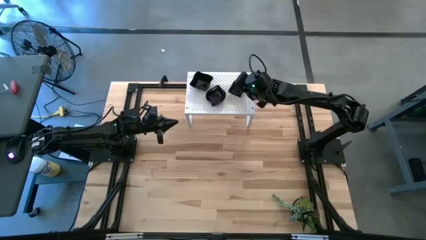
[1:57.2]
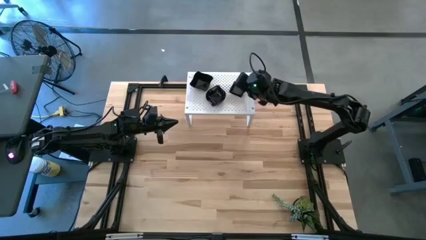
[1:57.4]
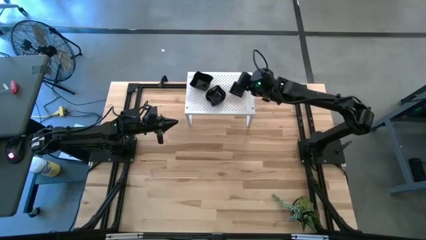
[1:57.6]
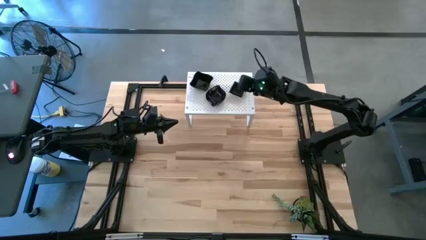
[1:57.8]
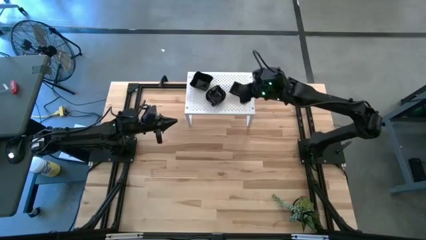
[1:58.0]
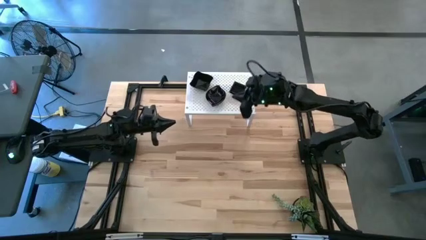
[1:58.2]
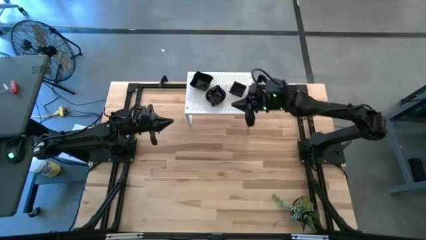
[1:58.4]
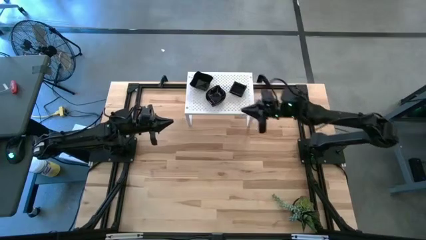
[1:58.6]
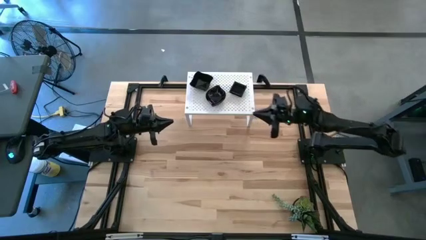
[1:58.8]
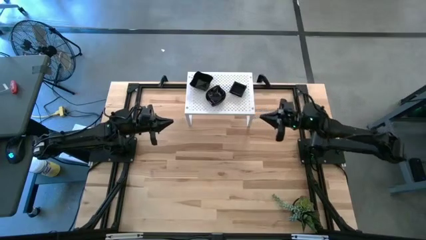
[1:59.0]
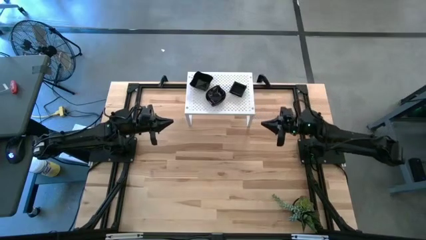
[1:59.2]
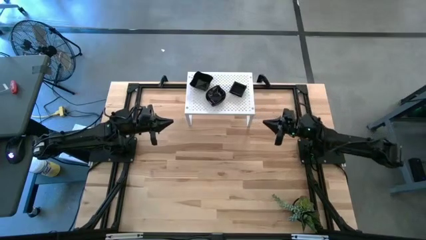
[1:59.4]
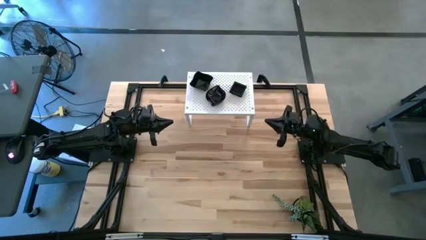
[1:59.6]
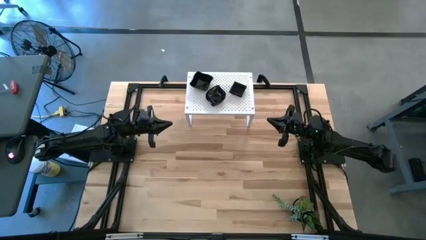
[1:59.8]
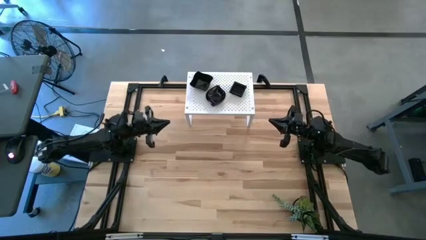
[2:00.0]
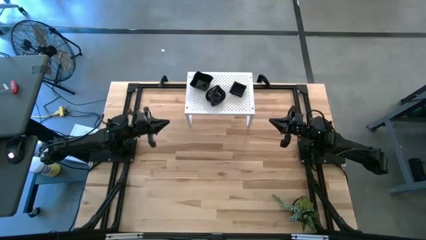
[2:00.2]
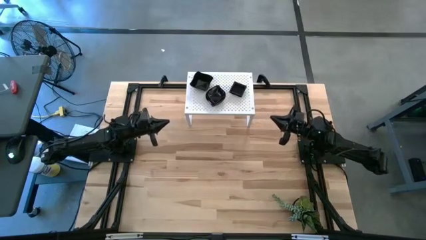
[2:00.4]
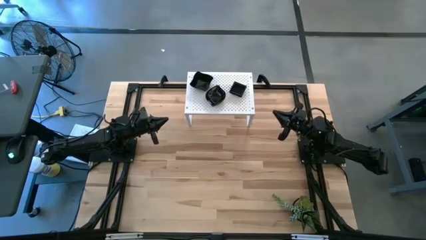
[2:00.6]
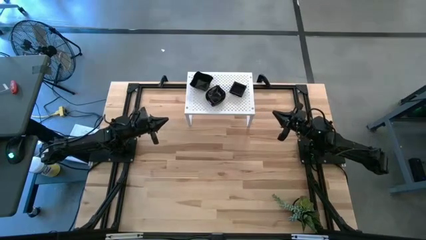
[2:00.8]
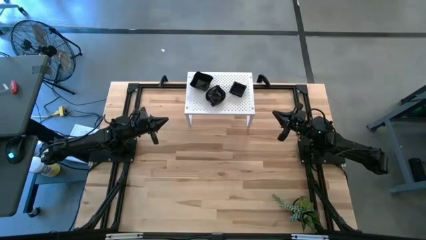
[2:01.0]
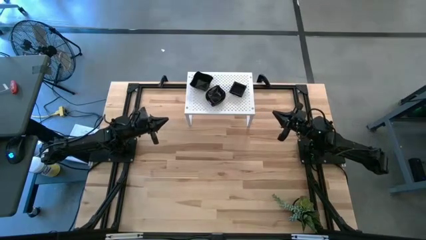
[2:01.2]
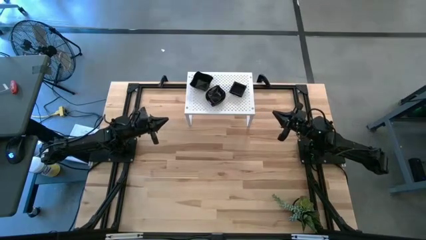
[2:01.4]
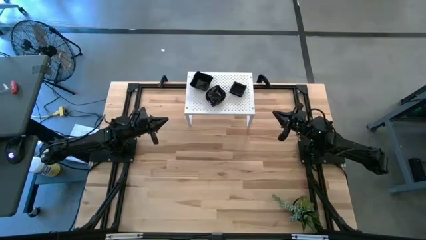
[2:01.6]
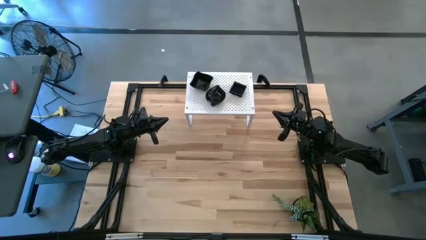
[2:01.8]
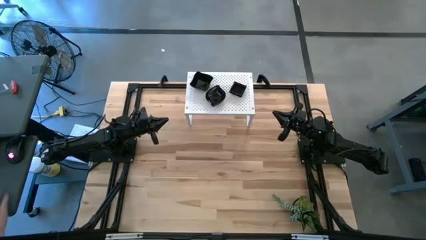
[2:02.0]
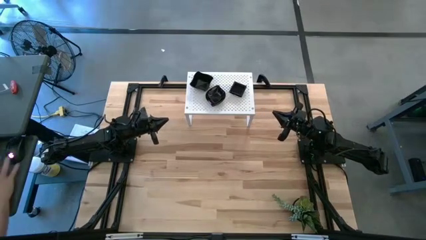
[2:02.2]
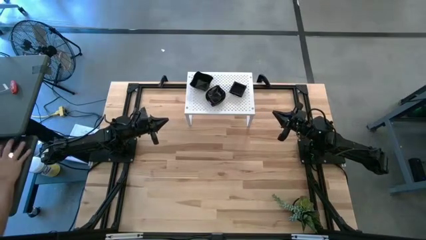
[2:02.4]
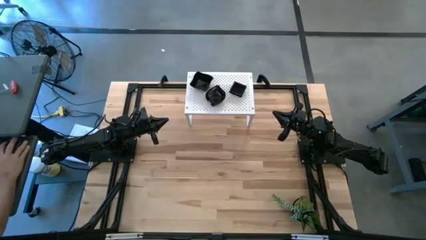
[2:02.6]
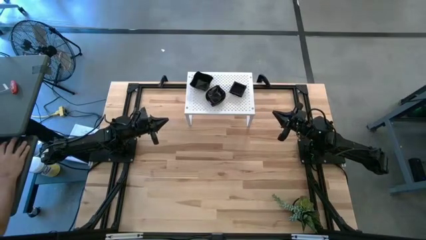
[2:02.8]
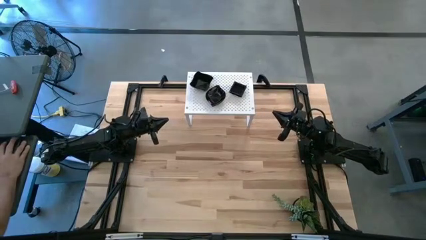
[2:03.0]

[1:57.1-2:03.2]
Task: Pick & Place Mini shaped plates
Return to Home Position

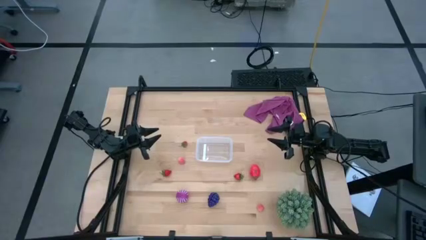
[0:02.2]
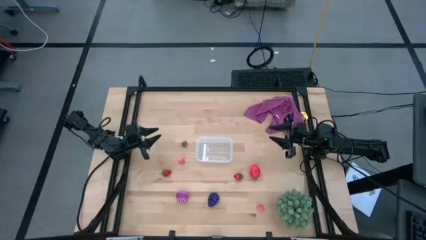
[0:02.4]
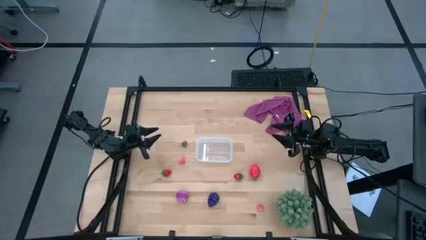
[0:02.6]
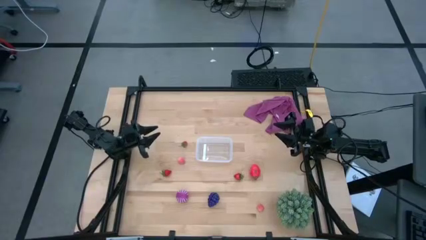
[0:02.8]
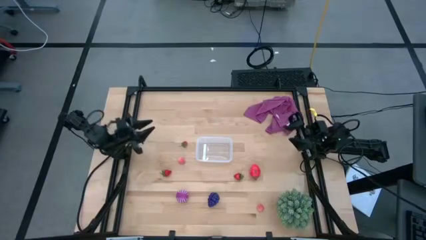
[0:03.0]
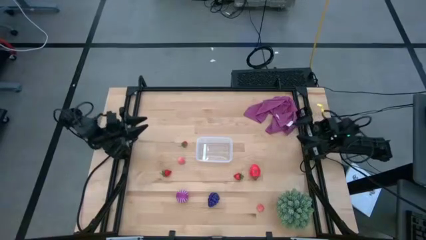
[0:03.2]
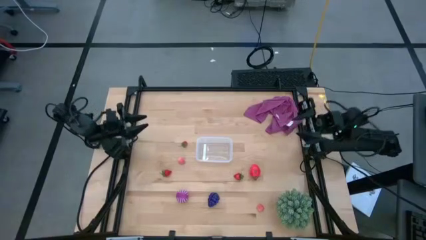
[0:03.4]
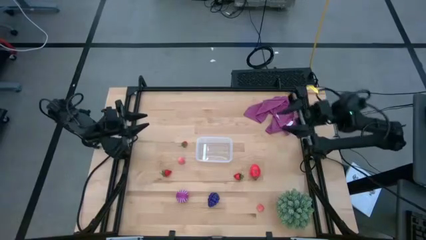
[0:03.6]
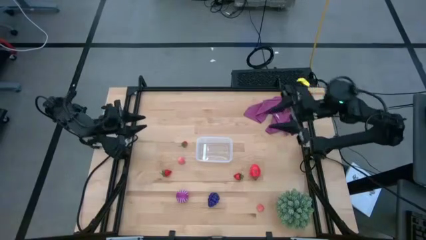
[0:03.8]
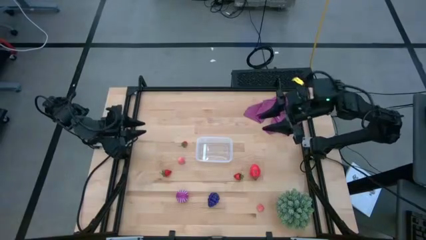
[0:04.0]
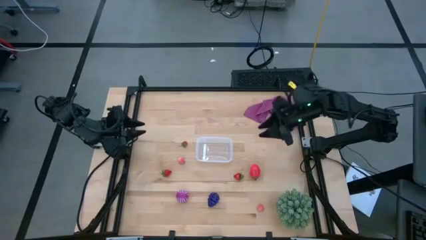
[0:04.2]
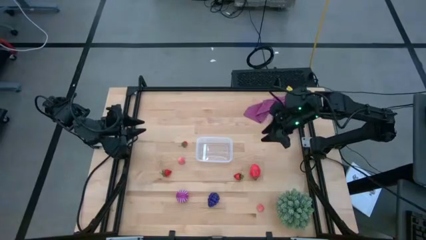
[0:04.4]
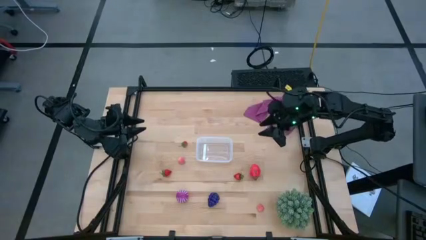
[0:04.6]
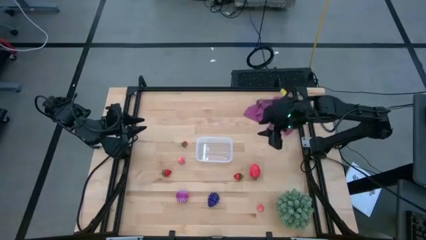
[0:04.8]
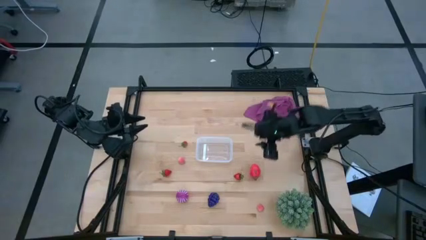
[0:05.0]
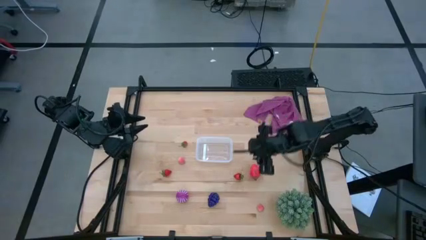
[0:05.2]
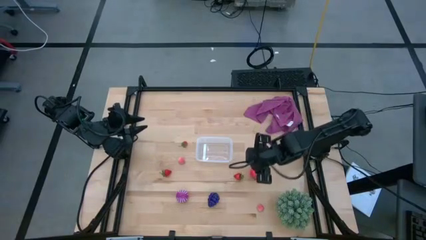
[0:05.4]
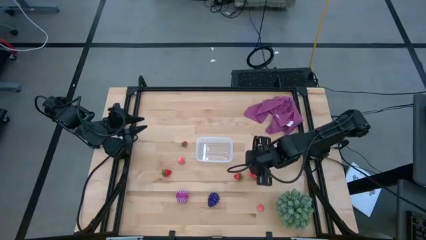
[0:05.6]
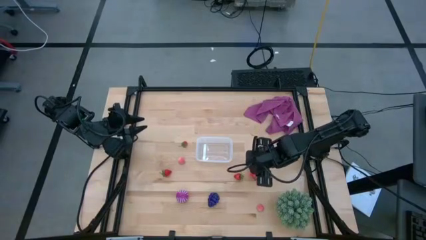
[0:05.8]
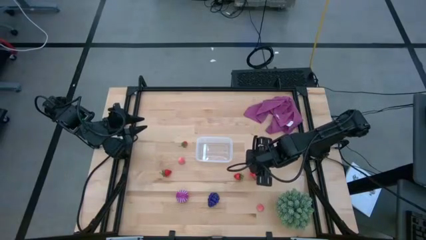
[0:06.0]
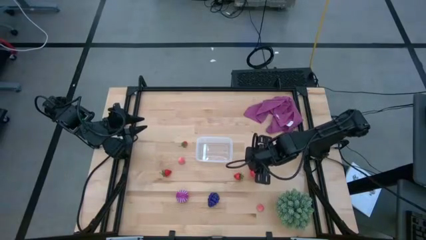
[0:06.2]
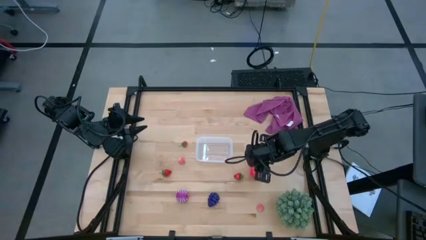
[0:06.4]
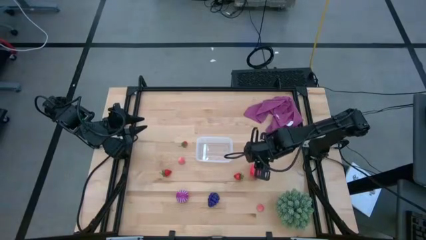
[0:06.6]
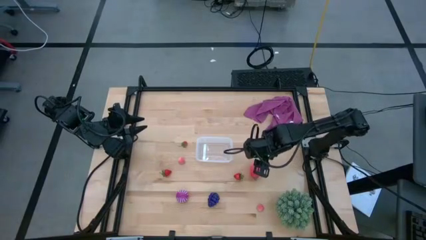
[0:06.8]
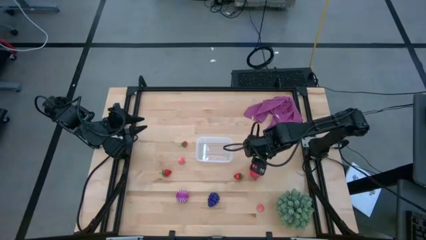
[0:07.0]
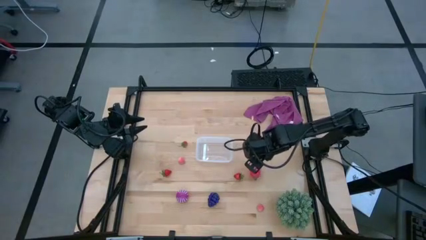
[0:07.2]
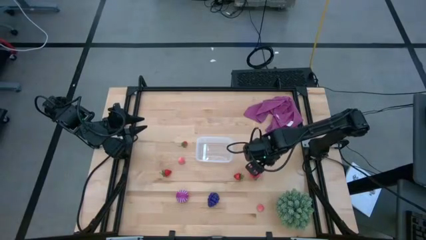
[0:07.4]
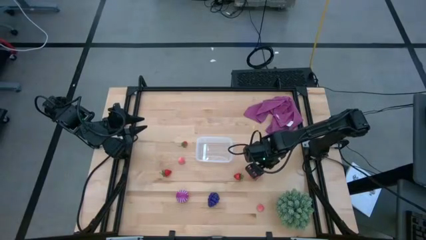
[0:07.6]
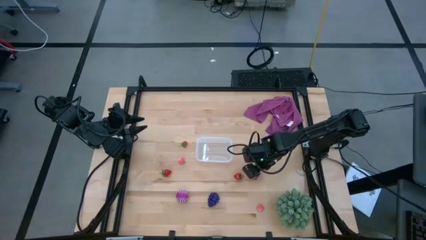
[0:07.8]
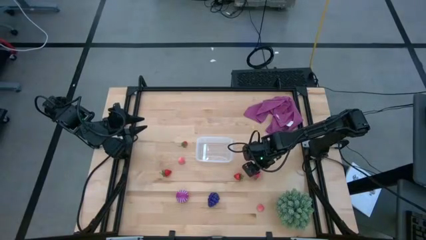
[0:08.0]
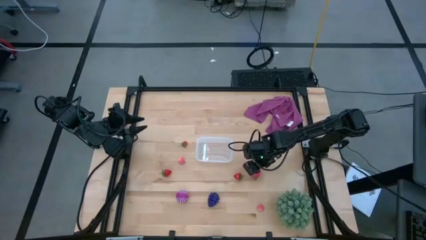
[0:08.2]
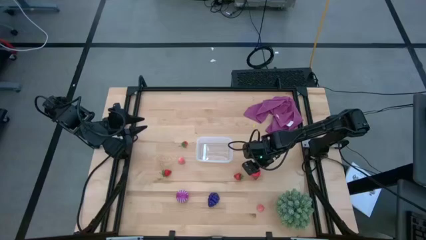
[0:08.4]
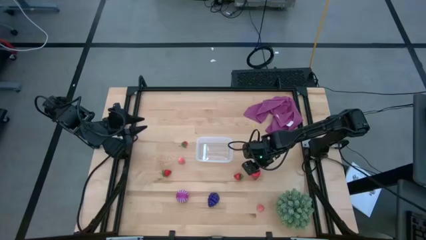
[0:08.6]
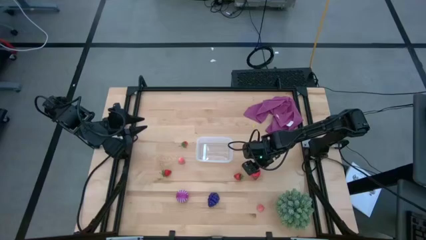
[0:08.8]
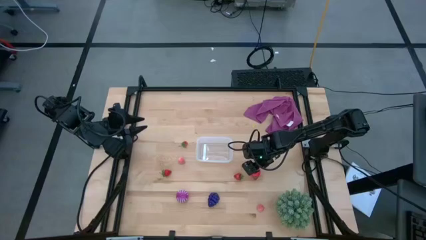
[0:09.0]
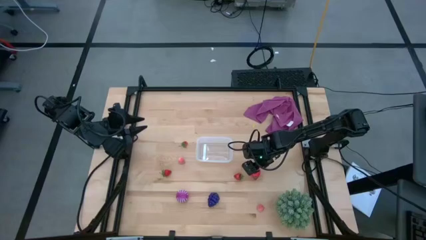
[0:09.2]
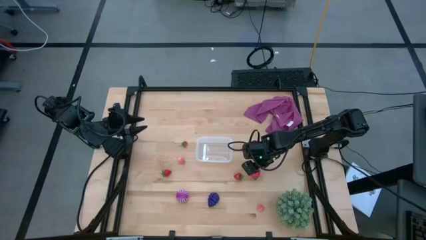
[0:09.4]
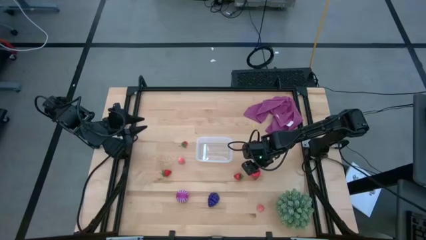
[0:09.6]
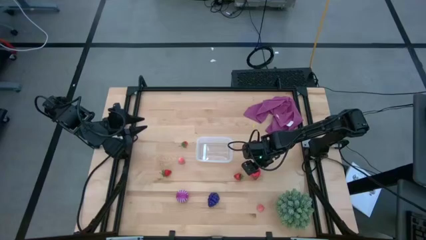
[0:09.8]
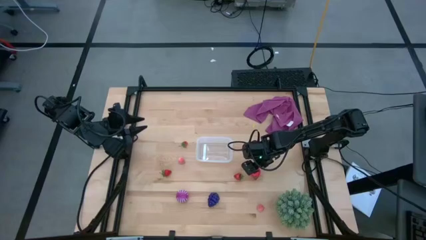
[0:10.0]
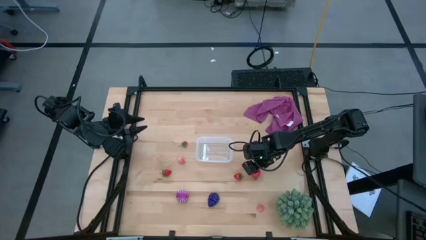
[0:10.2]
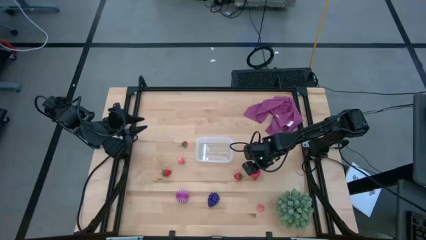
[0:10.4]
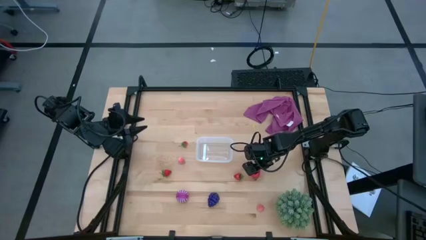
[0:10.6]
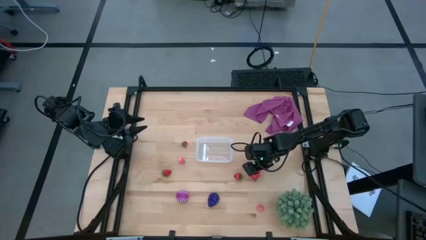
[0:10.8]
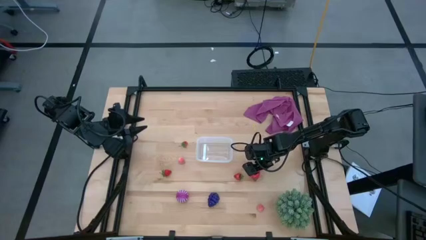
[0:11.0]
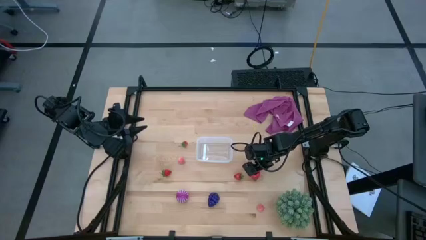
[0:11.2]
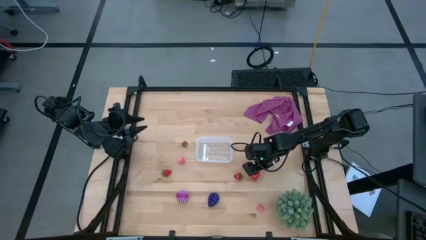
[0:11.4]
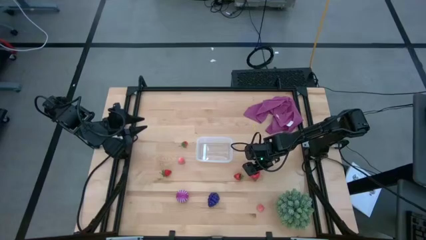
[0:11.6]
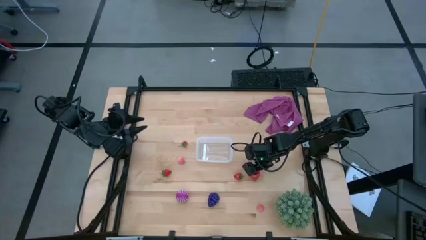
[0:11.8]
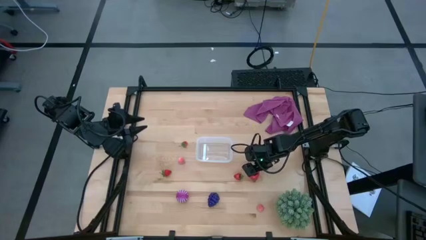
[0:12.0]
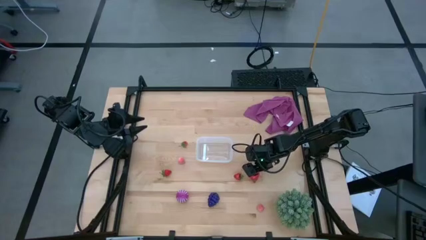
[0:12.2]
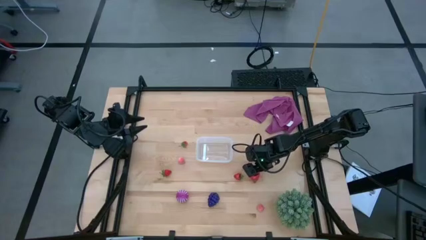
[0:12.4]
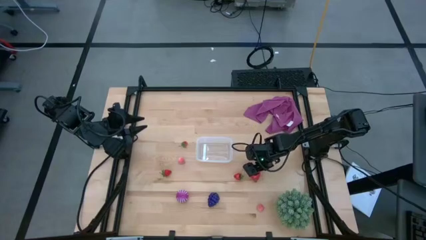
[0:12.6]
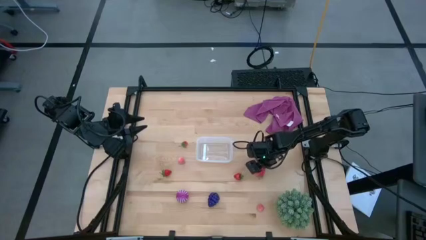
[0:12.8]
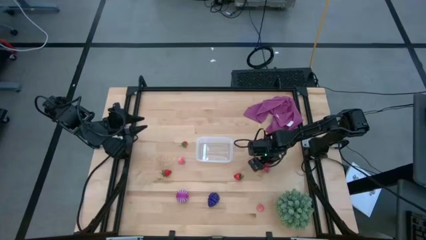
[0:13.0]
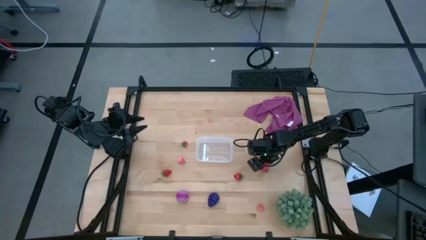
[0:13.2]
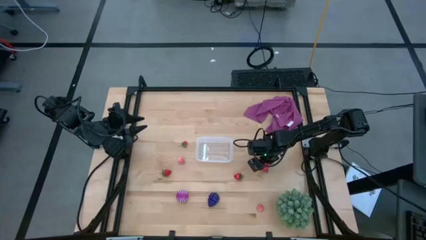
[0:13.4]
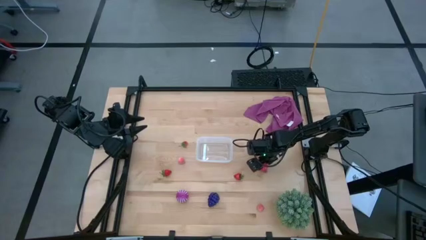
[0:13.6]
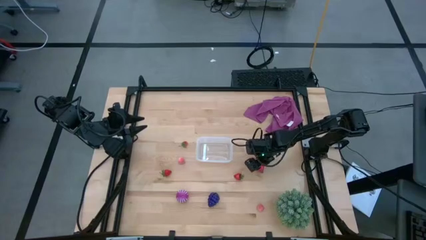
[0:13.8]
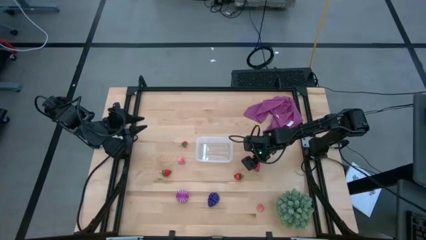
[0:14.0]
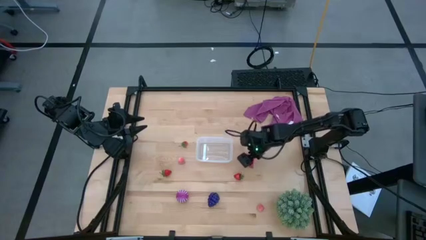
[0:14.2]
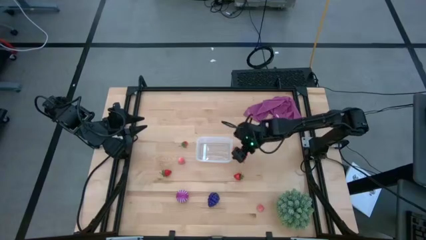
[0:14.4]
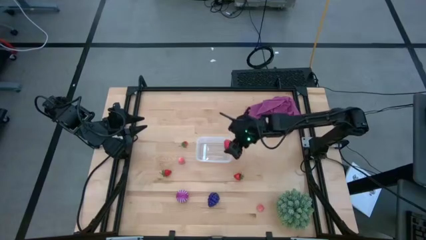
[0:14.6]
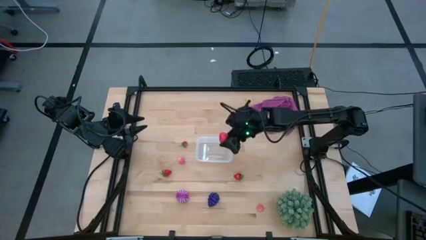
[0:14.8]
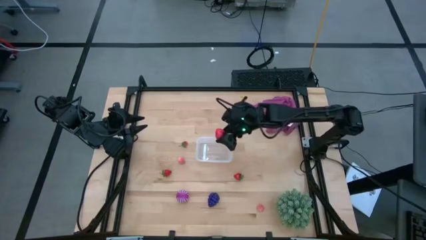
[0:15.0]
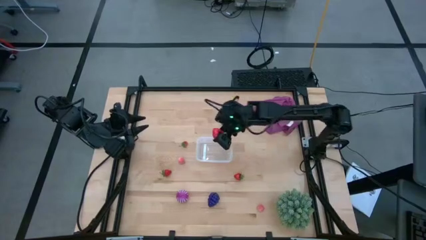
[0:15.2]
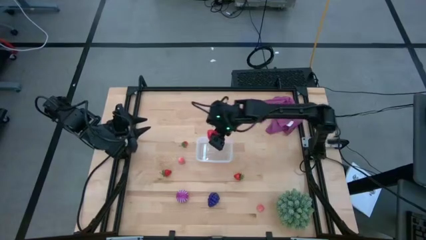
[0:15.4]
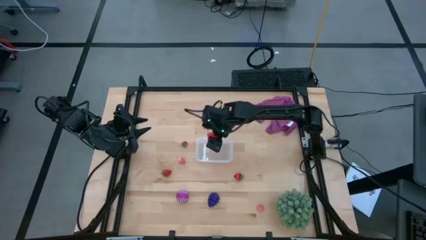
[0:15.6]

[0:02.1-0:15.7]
Task: Pick and placing Produce into tupperware
Put the red dragon fruit into the transparent container
